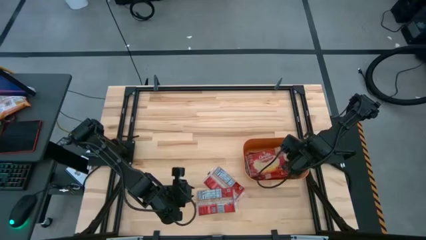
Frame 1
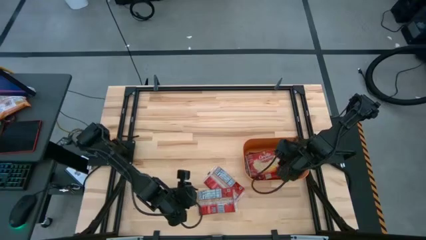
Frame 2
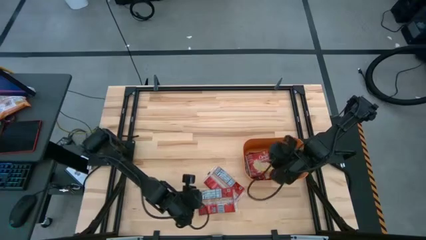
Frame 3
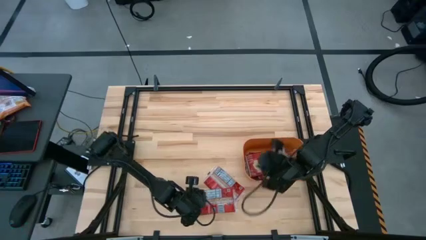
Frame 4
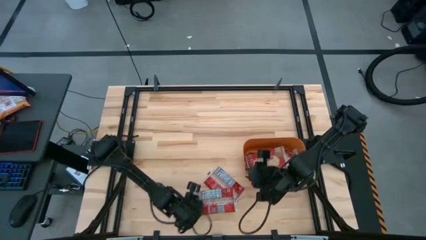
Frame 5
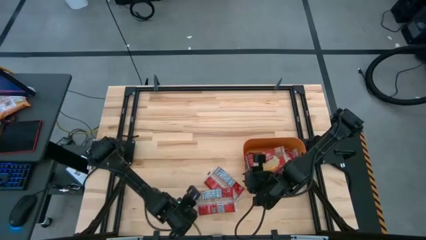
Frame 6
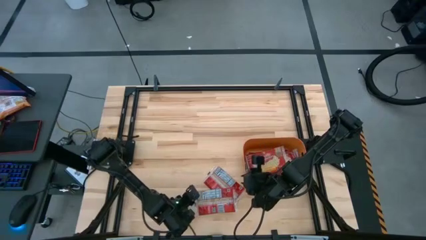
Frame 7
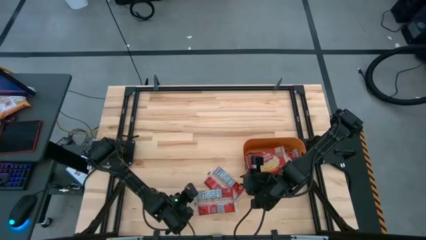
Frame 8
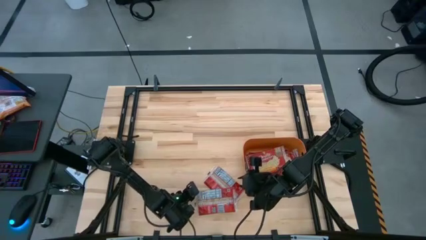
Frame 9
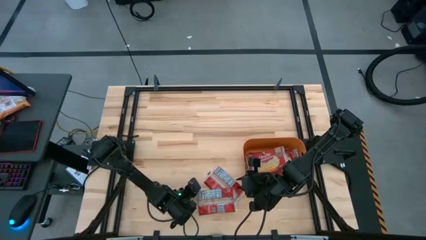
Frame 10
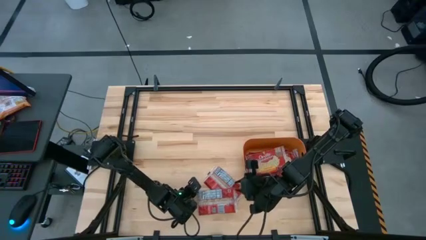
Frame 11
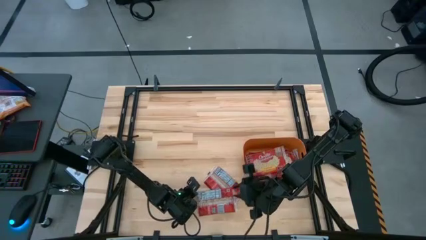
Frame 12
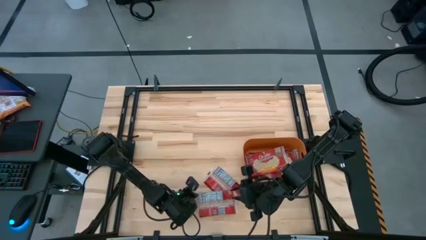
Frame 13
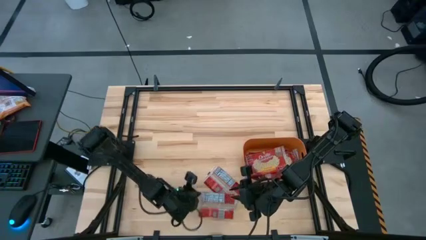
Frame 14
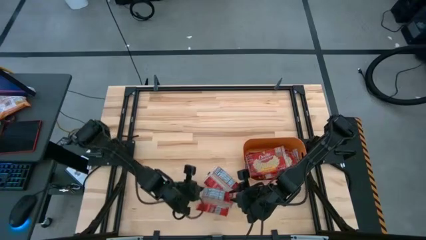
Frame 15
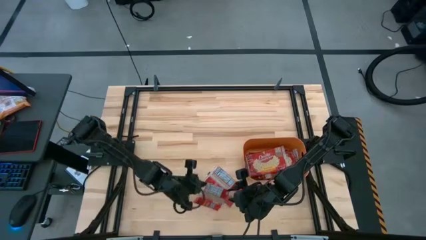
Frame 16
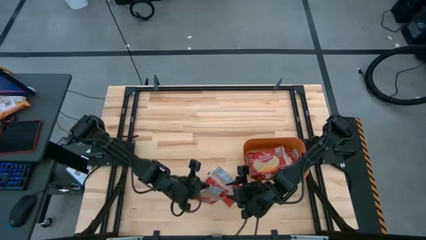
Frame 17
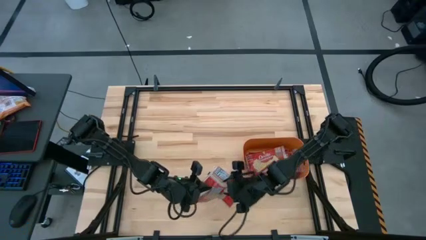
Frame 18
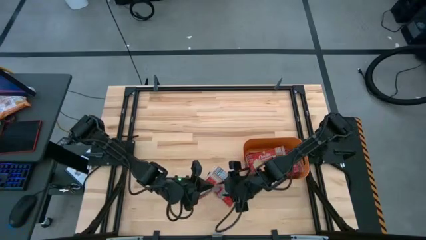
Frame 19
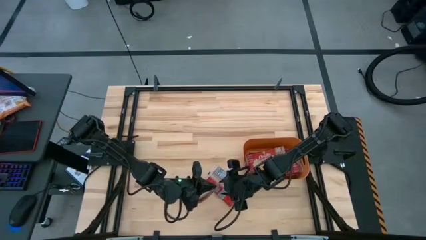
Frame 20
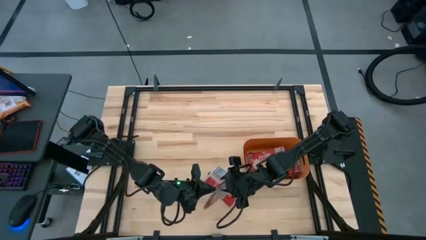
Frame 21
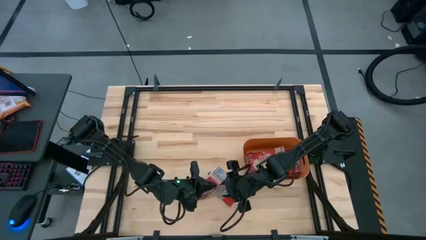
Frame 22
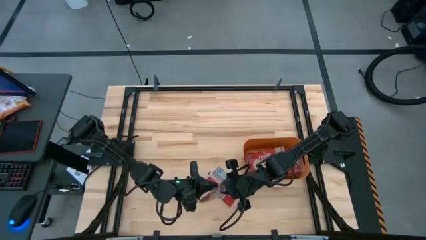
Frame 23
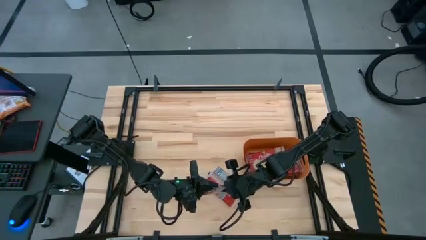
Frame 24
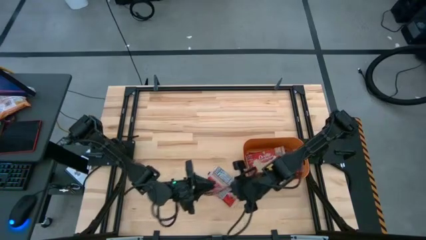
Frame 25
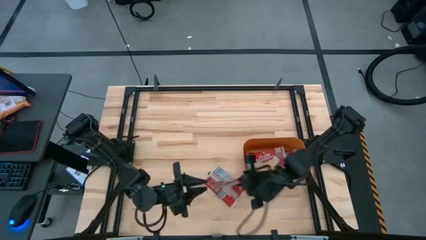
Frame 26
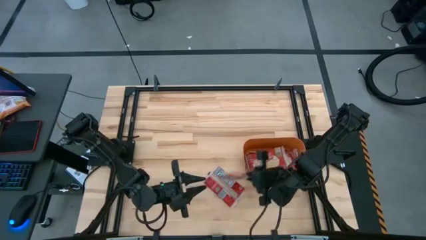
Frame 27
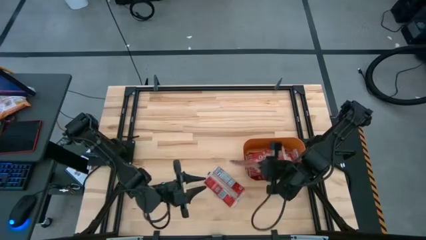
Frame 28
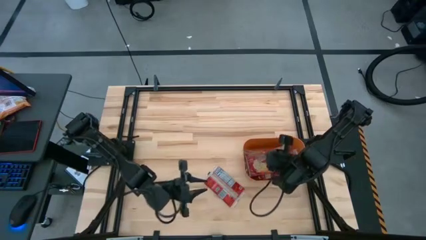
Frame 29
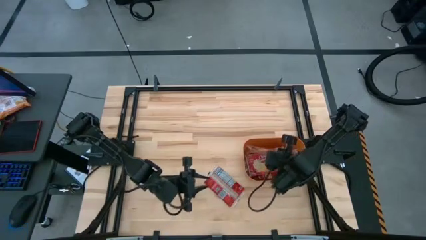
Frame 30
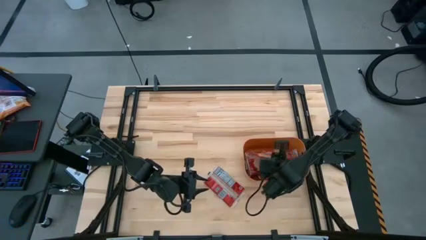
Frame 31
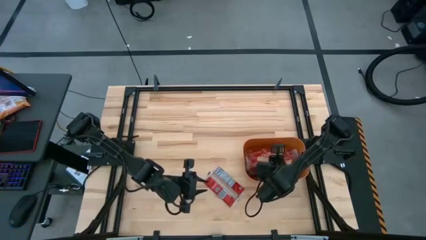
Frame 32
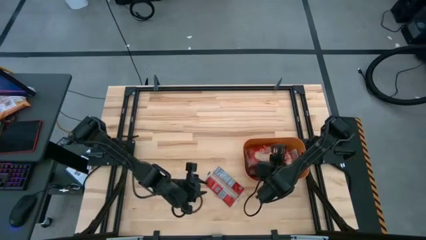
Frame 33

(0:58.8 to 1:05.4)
Task: Sort popcorn bags into baskets
Put the popcorn bag into the orange bin

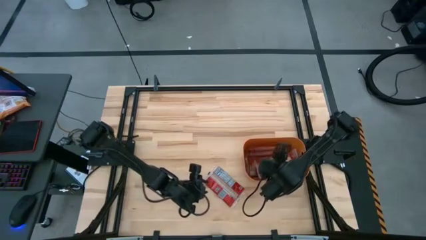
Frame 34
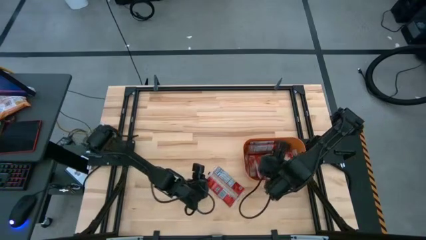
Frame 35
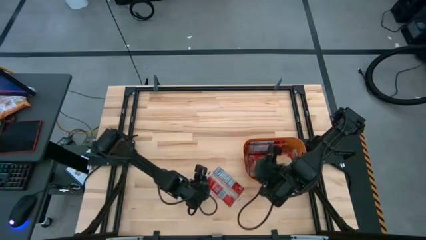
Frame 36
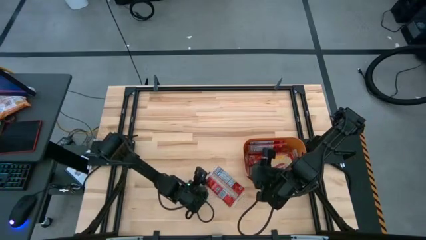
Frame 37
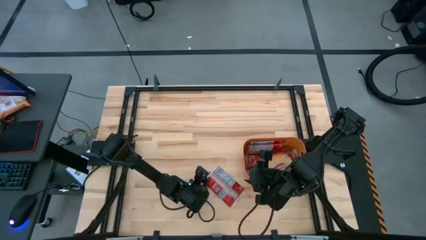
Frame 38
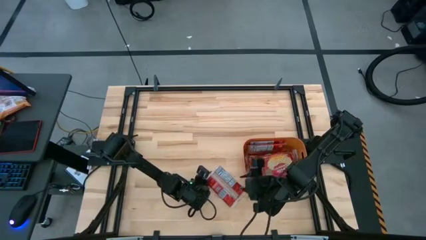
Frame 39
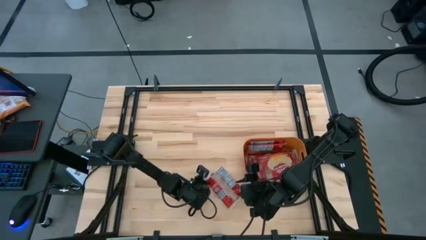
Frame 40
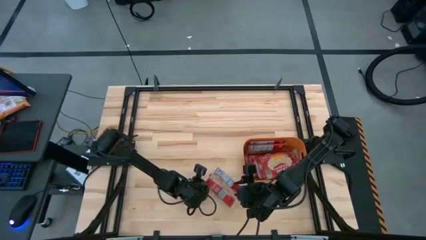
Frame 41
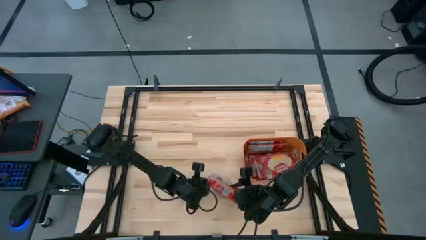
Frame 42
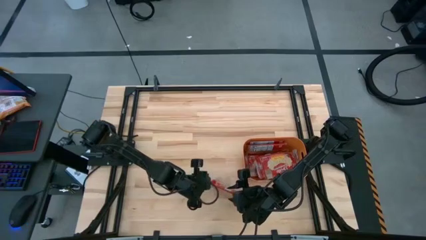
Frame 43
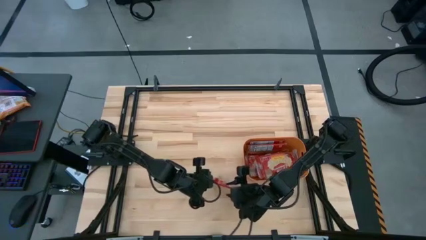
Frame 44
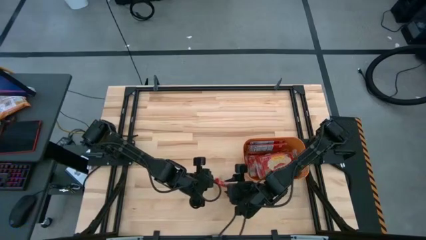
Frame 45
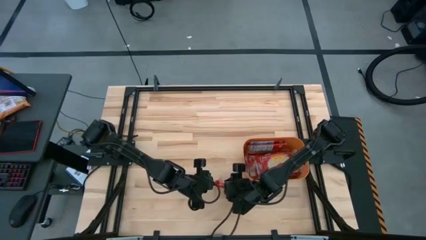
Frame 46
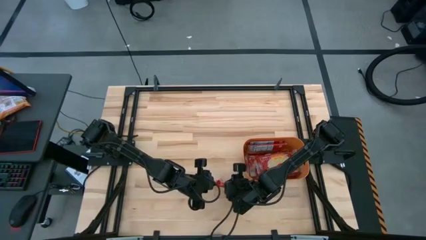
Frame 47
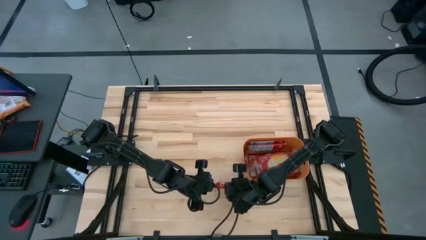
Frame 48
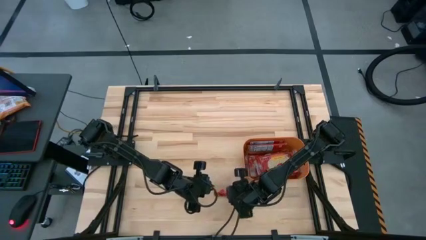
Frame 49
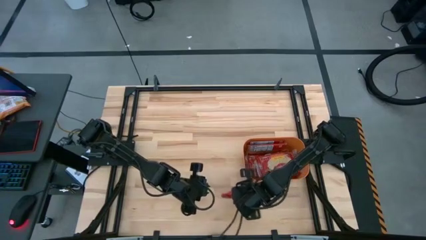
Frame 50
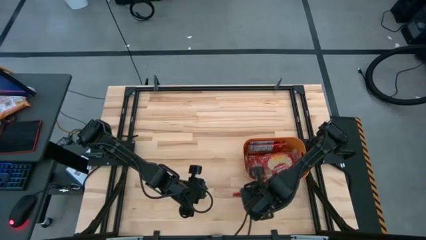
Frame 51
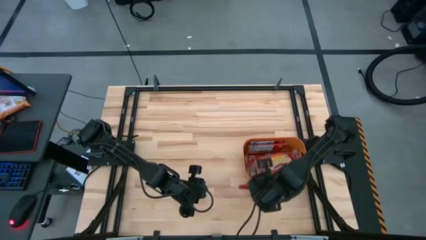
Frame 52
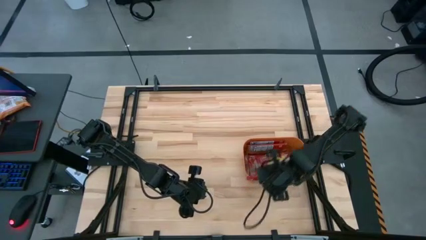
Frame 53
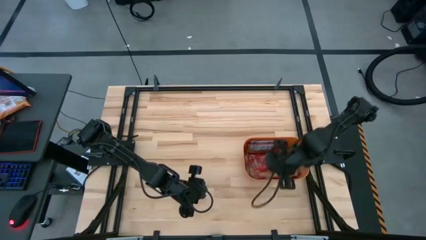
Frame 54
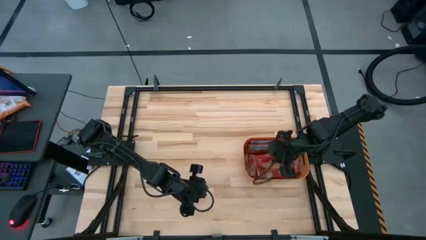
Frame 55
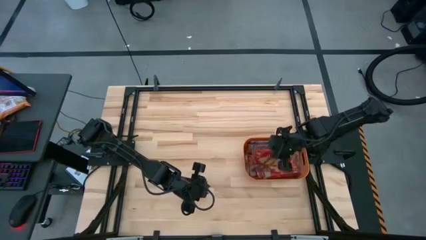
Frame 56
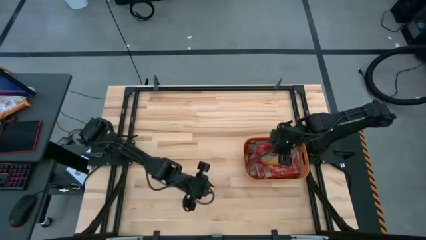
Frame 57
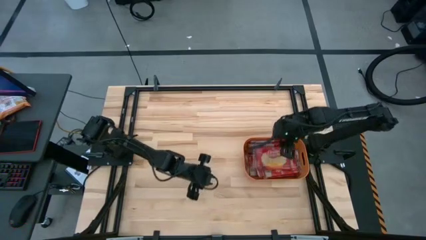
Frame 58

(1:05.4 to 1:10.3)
Put the popcorn bag into the orange bin

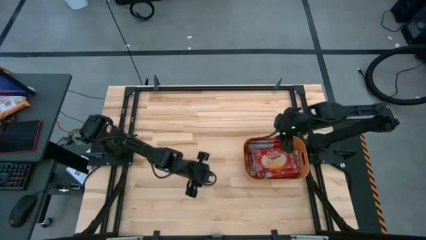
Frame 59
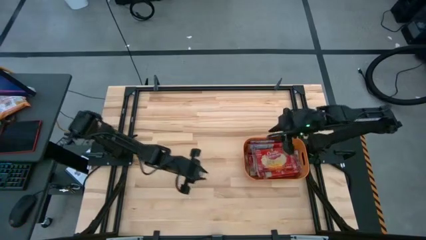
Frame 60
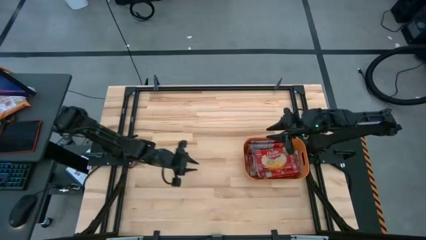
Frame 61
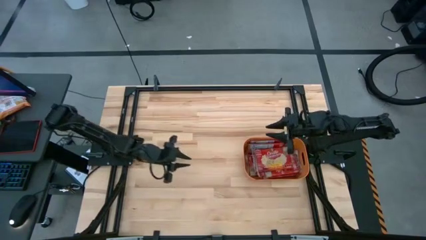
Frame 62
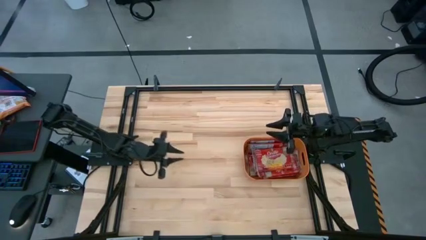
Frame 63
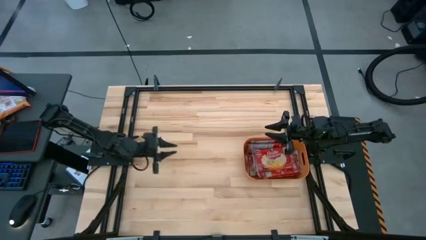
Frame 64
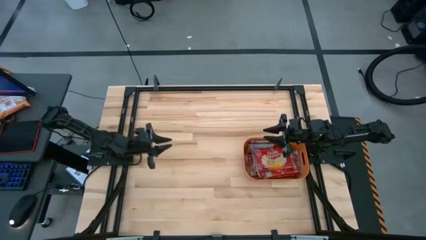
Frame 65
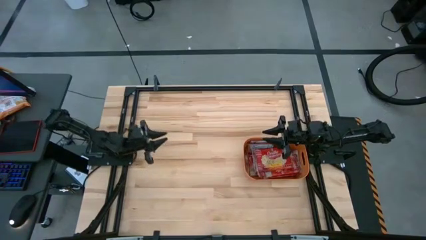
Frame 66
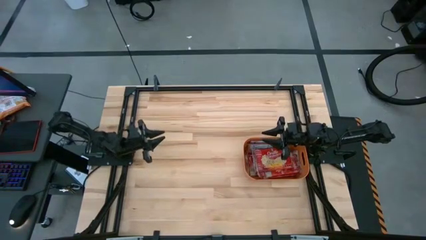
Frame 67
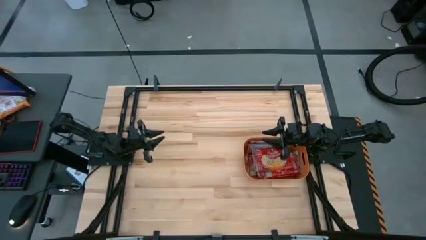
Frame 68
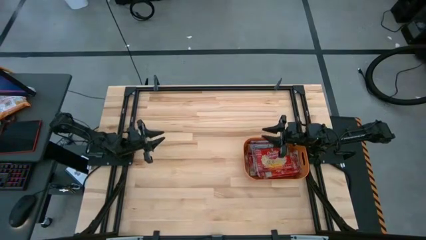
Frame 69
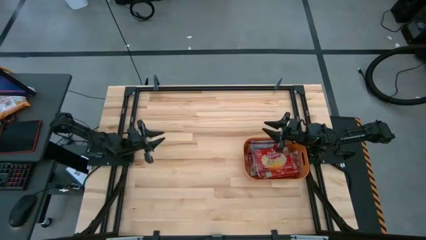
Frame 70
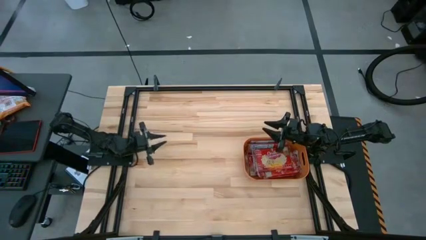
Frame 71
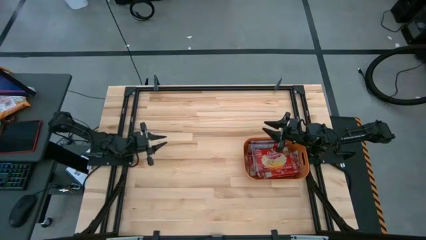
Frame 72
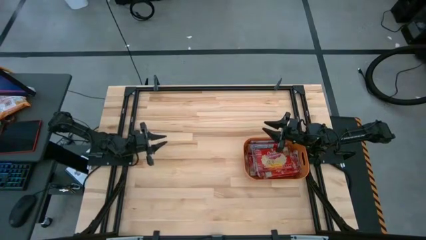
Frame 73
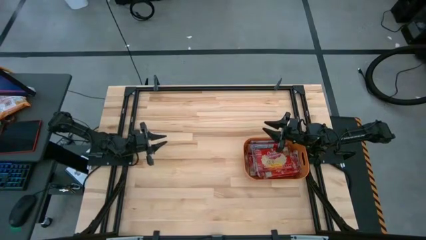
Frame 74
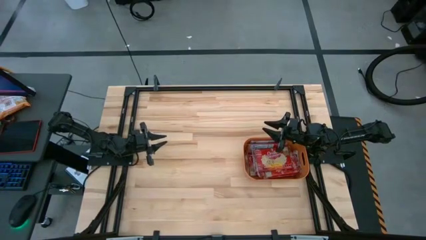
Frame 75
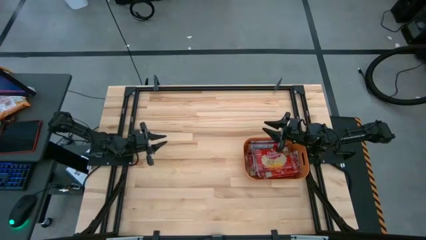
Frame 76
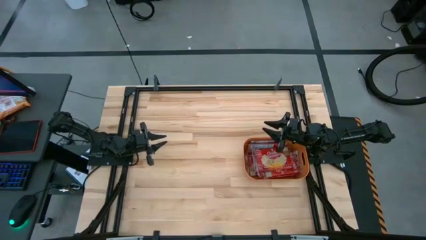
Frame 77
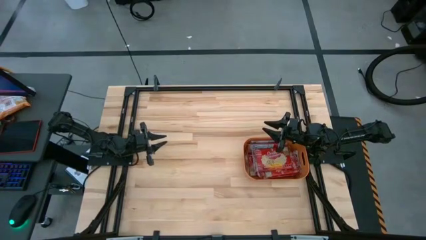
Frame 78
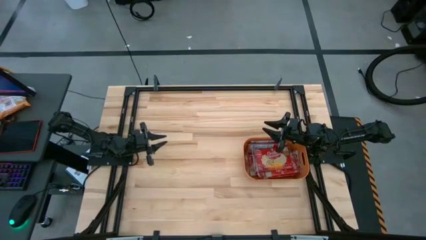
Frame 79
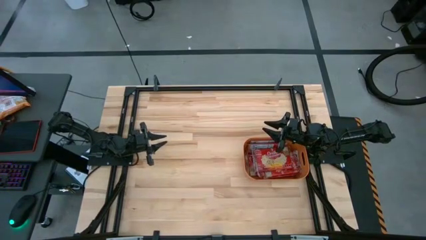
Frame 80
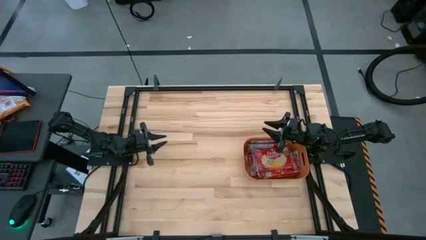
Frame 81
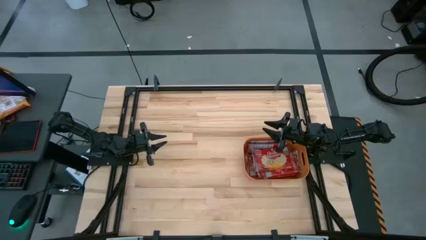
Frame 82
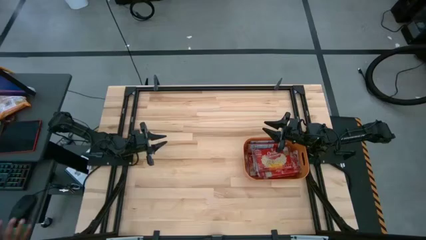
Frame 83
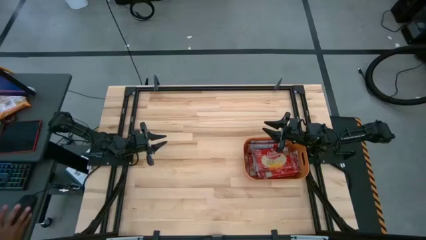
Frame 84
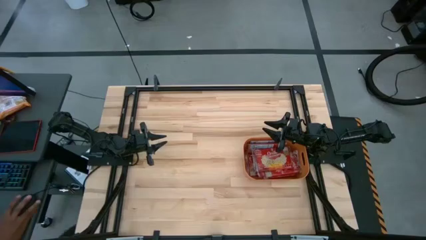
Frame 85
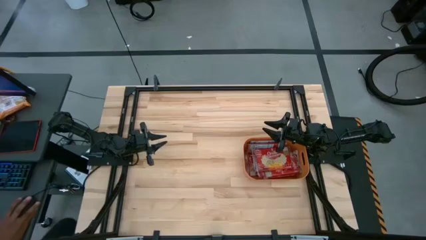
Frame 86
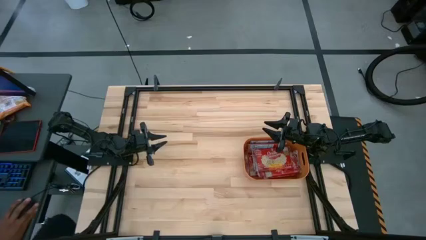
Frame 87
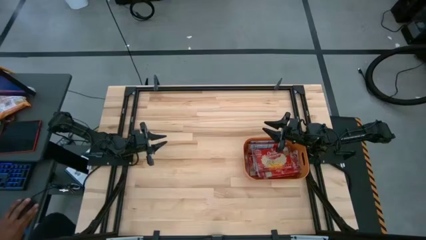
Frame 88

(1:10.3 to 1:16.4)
Return to Home Position
